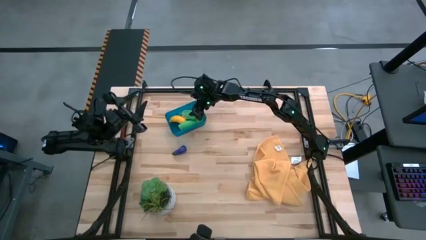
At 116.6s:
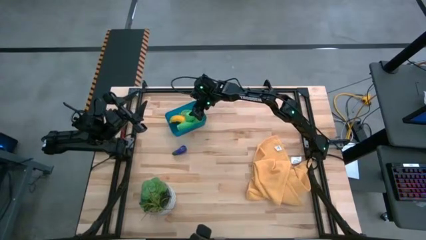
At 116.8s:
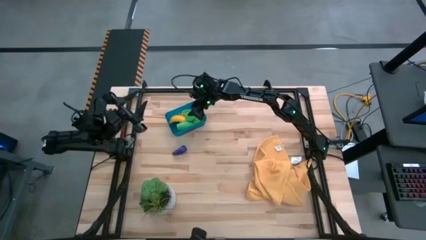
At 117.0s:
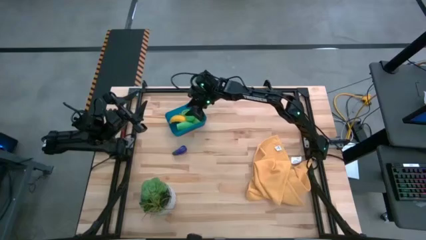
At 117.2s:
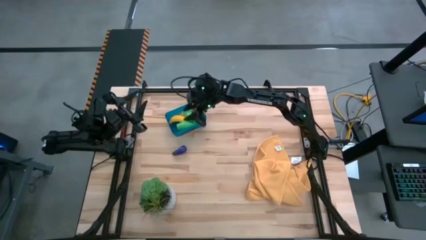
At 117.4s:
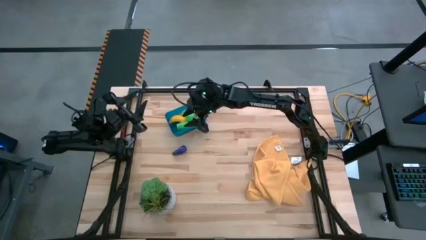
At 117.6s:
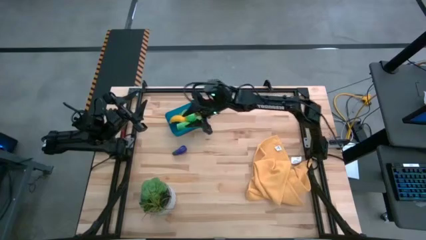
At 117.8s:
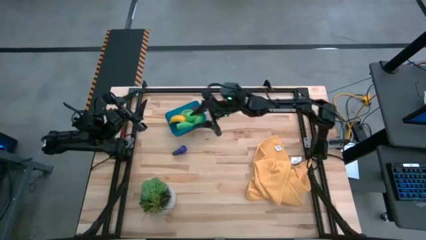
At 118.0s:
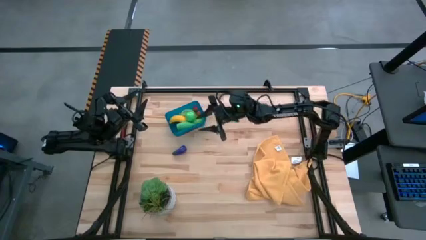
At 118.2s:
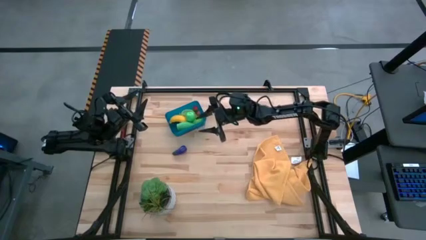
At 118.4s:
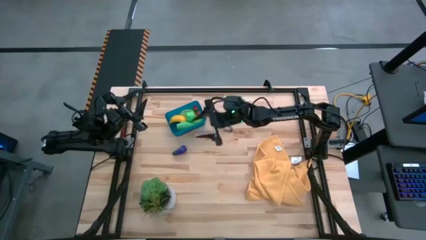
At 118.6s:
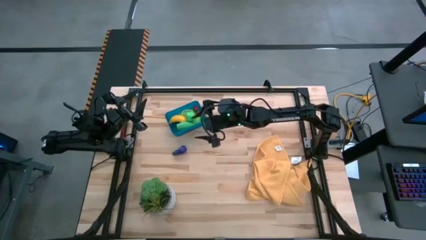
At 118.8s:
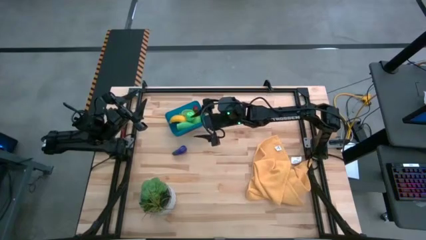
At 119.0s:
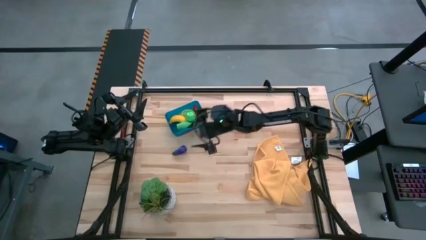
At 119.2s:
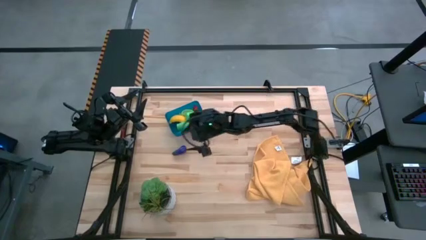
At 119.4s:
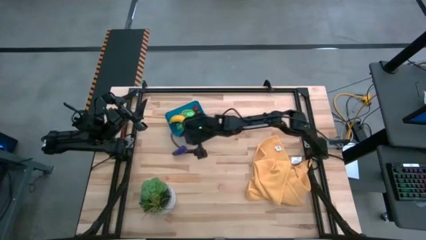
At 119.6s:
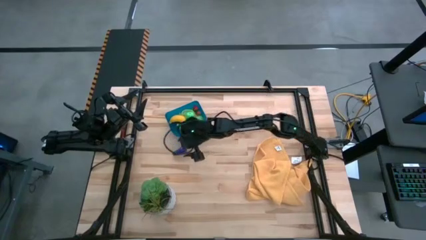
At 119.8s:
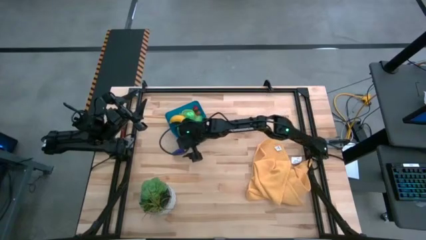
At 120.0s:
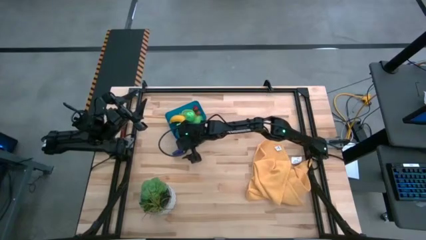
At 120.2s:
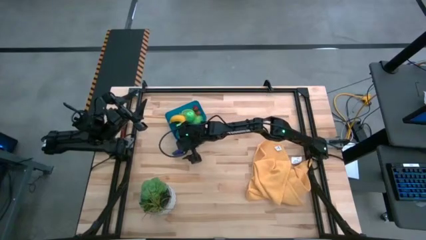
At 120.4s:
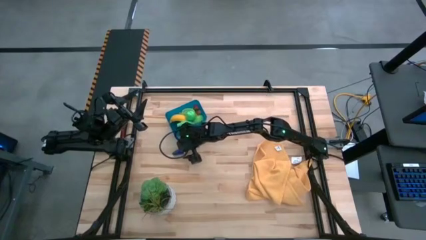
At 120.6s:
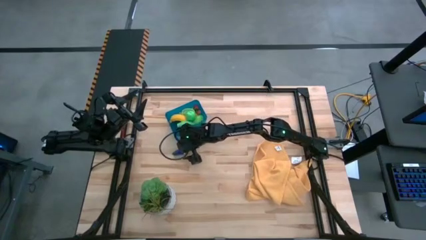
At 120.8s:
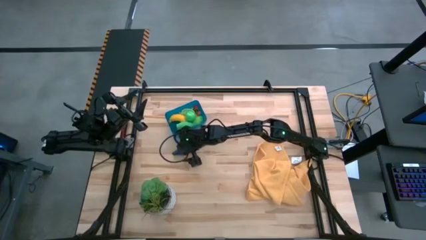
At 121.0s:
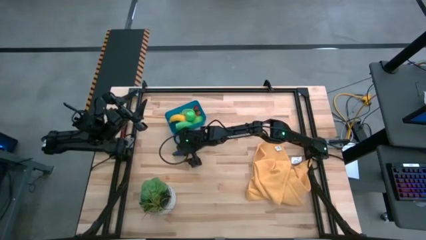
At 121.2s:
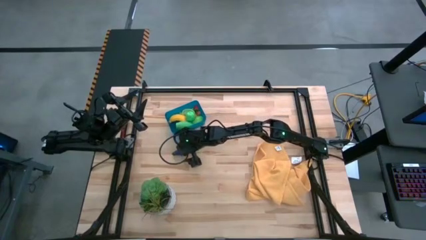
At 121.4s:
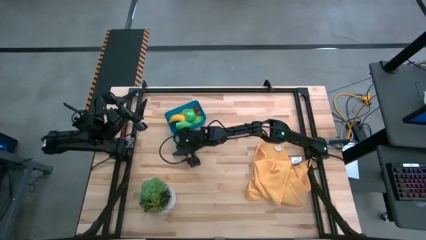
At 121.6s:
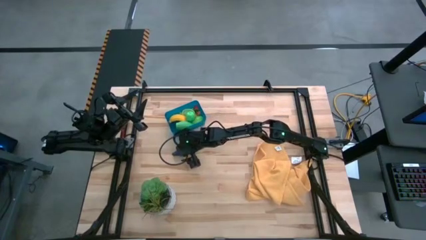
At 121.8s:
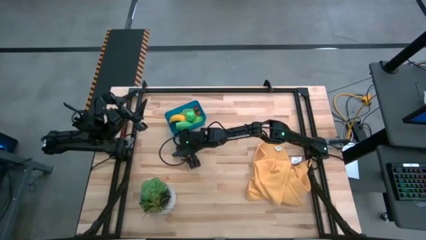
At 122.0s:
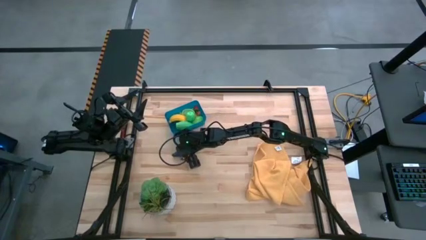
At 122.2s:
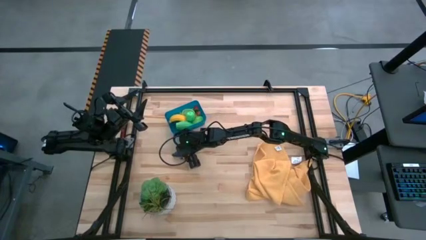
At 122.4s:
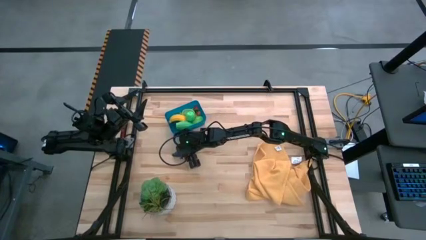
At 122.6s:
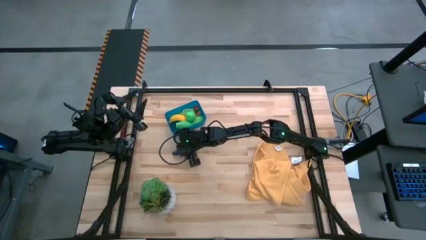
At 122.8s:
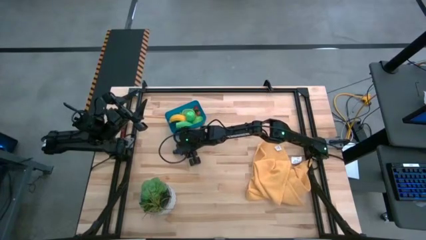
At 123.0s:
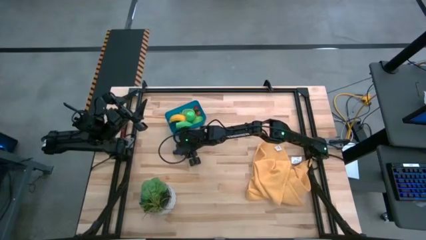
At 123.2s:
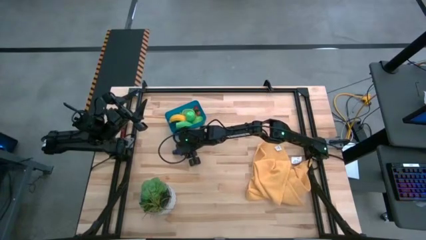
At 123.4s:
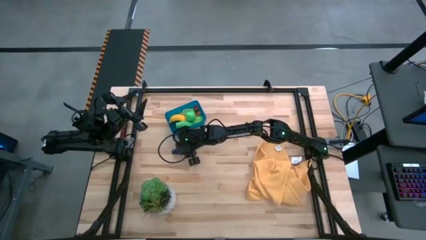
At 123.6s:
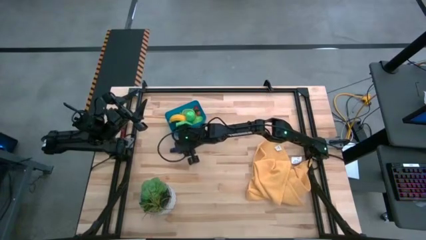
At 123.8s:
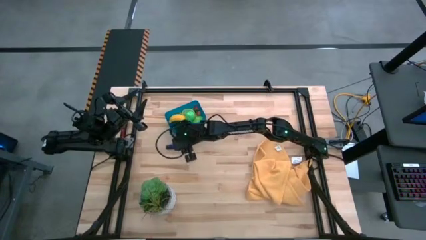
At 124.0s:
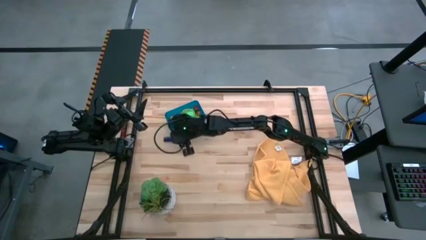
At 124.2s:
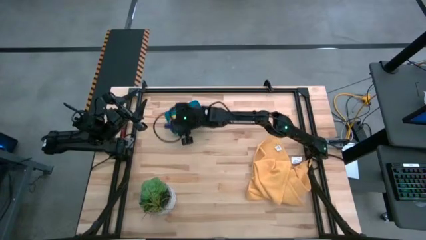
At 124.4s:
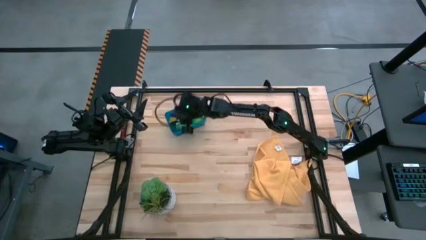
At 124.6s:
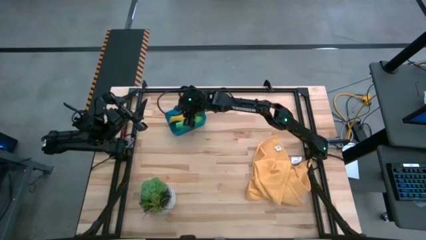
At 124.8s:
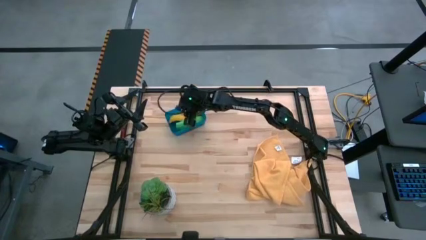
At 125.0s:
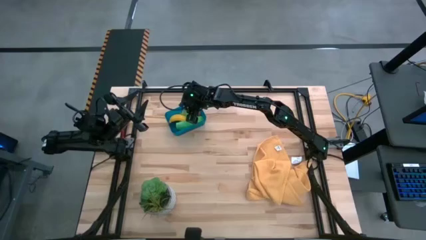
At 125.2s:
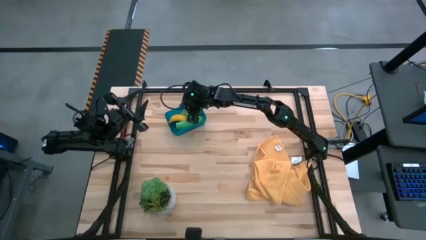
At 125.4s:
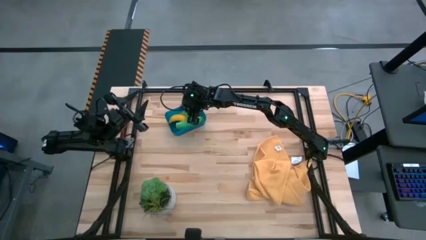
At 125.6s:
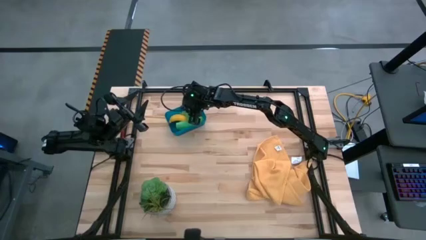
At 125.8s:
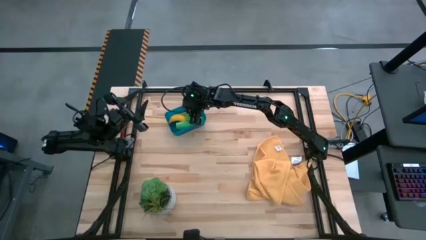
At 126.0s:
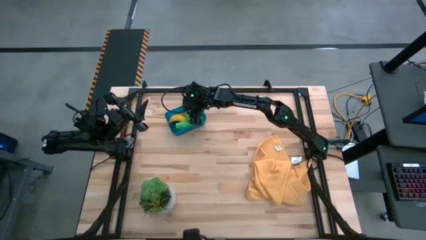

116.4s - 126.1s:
Task: Pick and placing Produce into tupperware
Put the eggplant into the blue bin

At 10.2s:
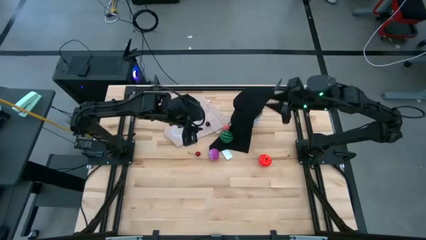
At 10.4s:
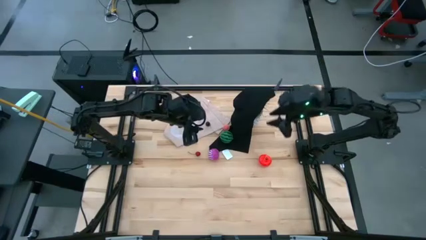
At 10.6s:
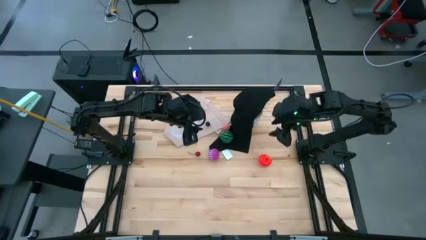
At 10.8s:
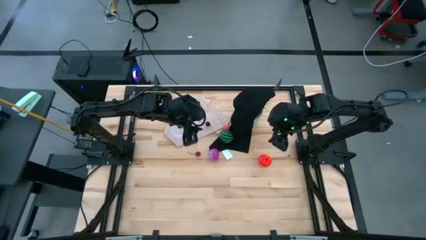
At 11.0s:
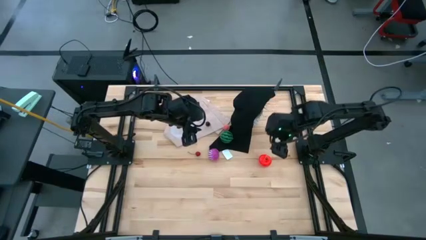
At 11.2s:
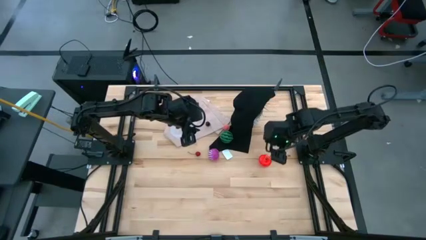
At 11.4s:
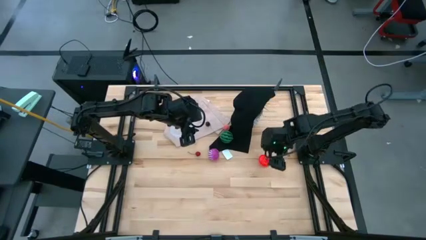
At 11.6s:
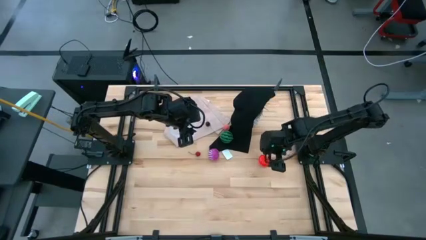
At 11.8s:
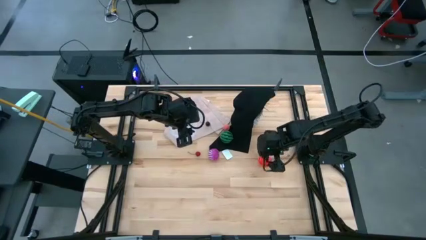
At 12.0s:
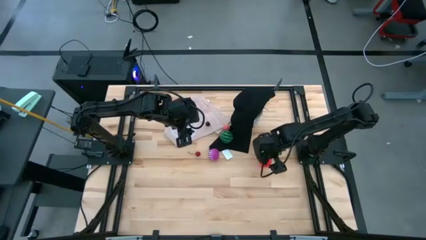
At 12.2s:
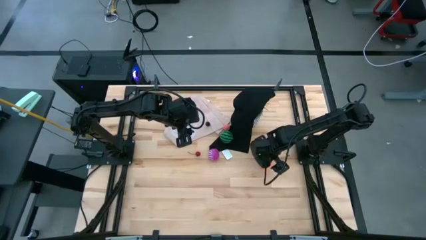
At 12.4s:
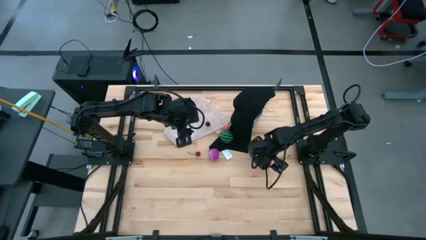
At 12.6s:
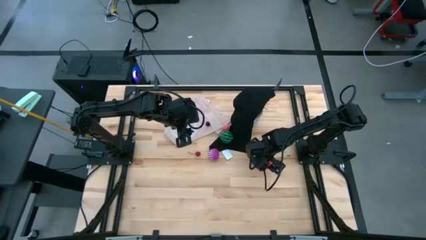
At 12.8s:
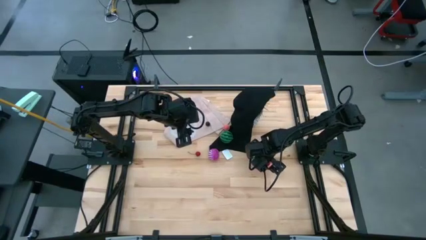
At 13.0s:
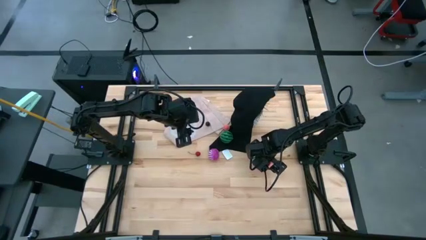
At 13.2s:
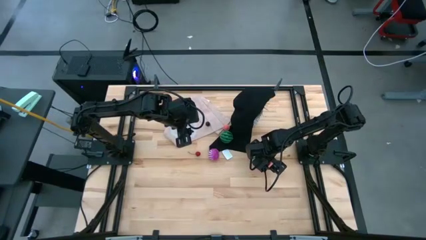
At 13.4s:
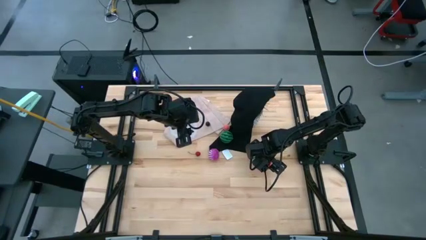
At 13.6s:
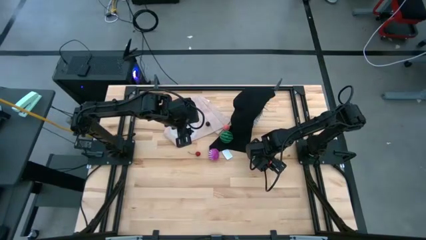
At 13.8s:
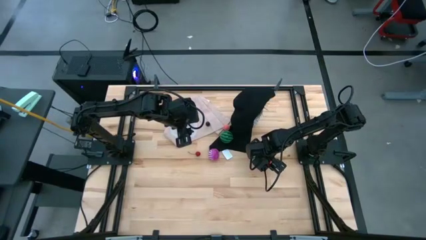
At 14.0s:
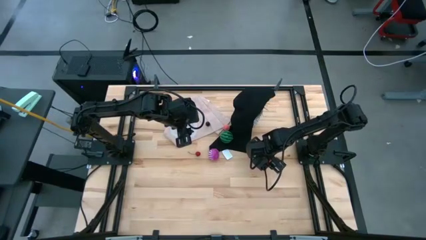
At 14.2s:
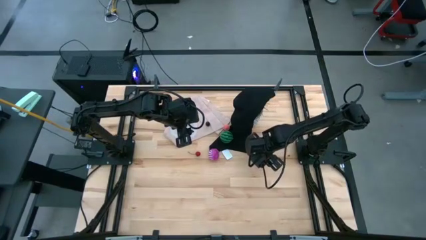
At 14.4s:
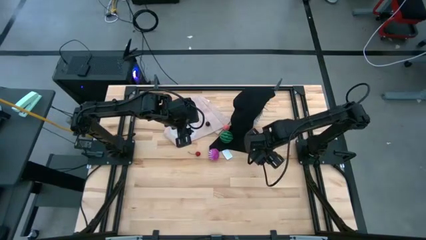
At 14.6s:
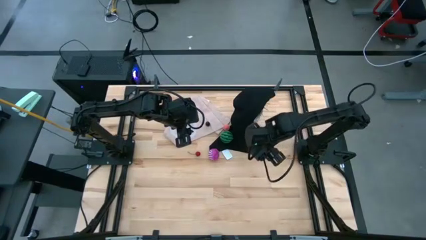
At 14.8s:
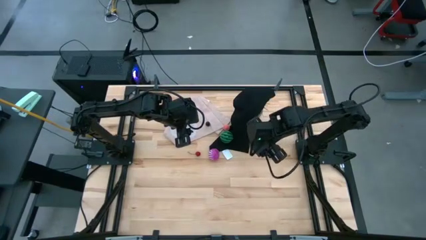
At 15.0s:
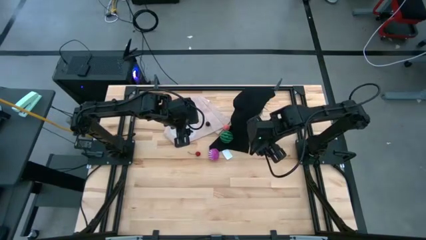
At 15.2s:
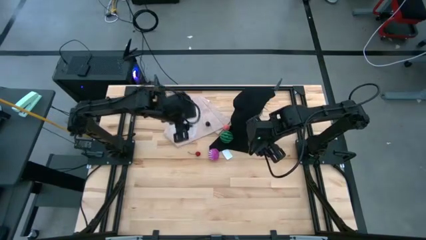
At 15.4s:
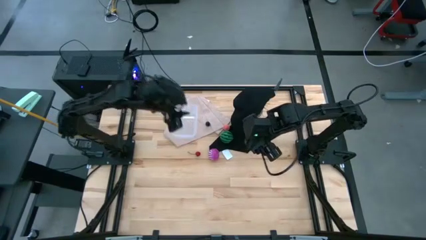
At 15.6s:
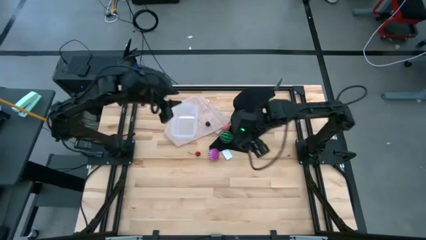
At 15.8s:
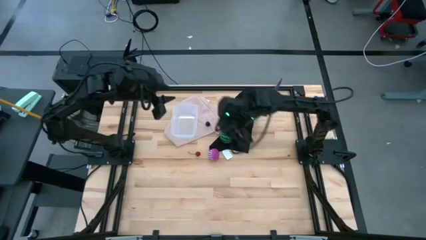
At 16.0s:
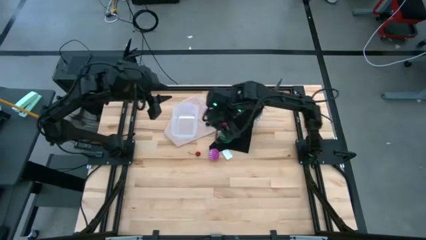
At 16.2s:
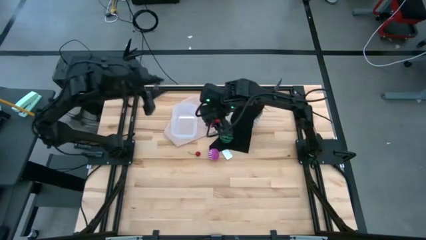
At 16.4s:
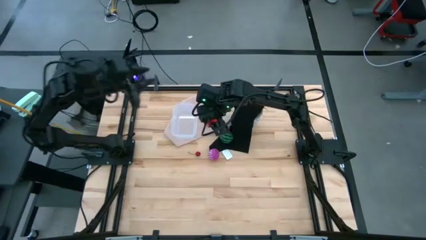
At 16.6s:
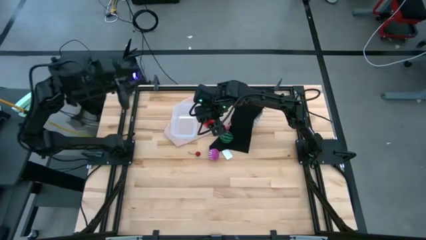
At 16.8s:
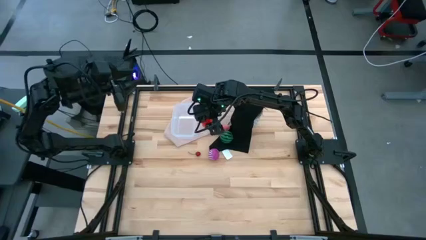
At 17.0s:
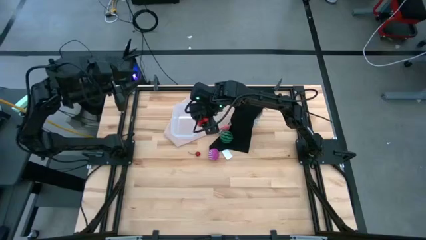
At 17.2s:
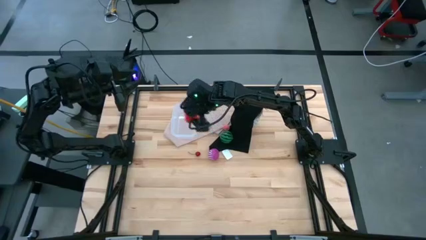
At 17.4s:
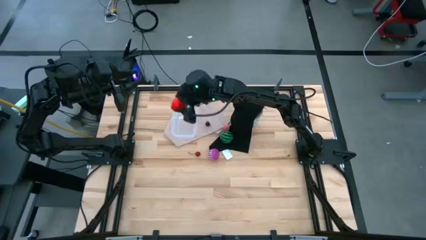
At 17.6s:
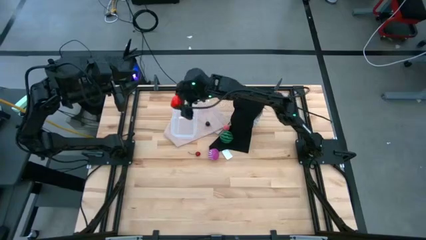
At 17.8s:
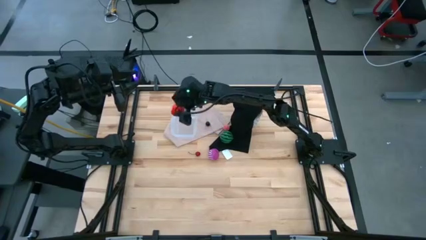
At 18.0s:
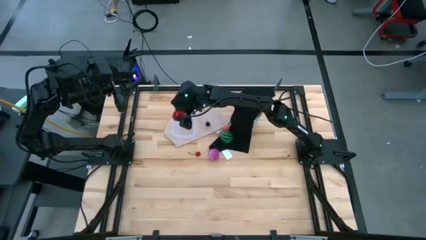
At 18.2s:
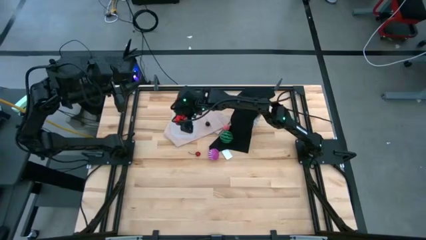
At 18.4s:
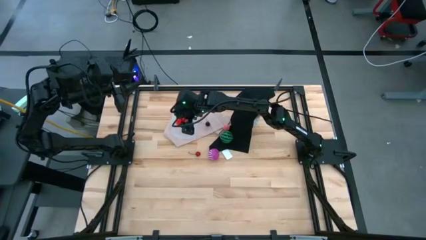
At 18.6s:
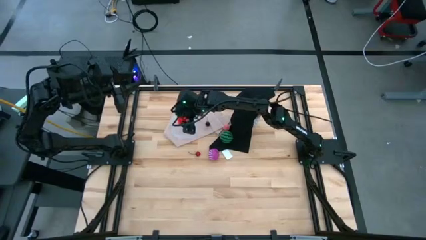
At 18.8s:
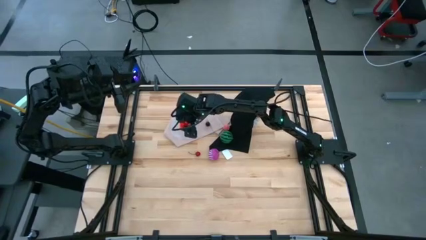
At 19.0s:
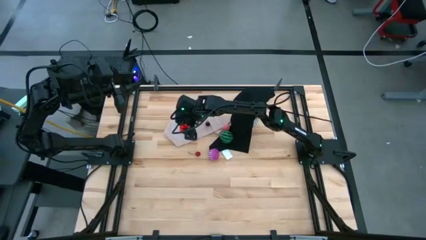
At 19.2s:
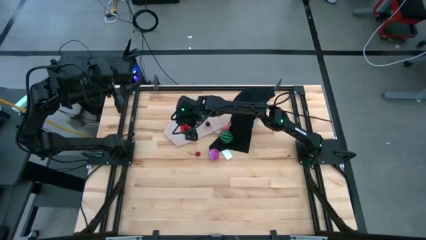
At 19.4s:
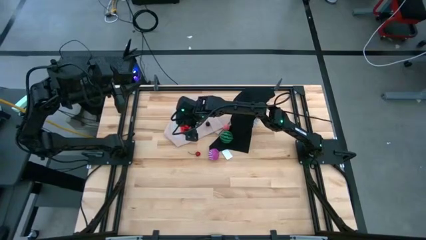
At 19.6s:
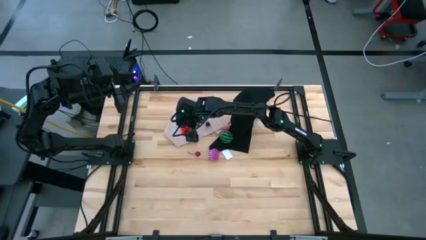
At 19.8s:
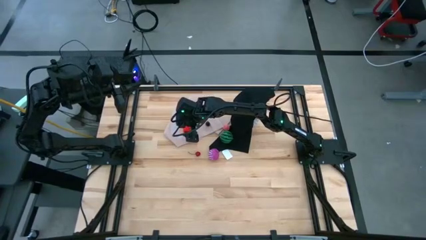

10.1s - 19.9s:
Task: Pick and placing Produce into tupperware
Put the red apple into the transparent bin
